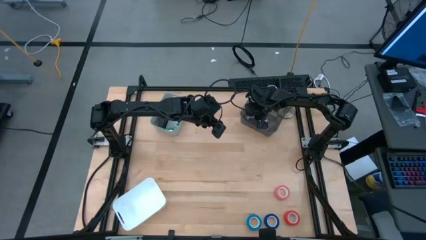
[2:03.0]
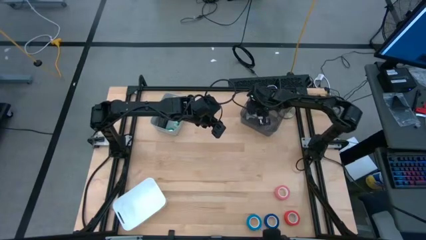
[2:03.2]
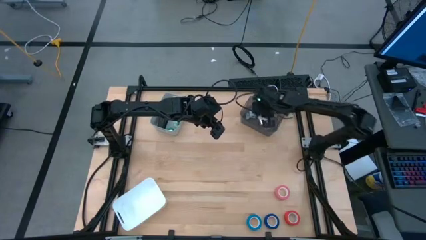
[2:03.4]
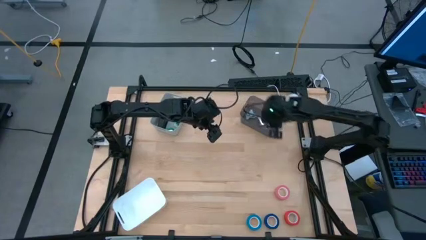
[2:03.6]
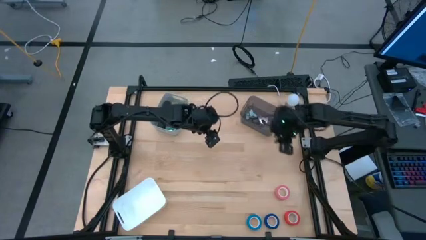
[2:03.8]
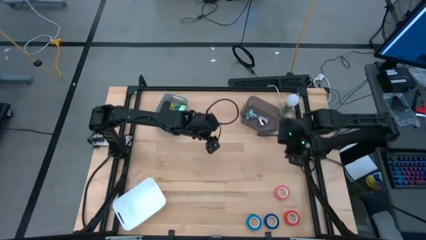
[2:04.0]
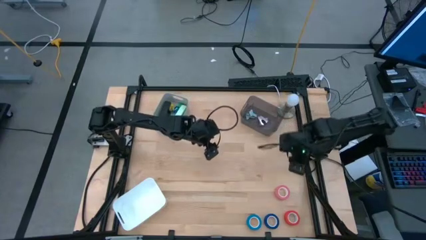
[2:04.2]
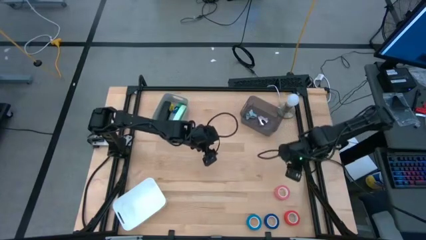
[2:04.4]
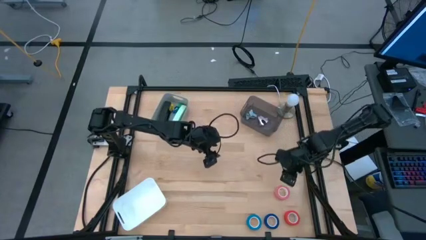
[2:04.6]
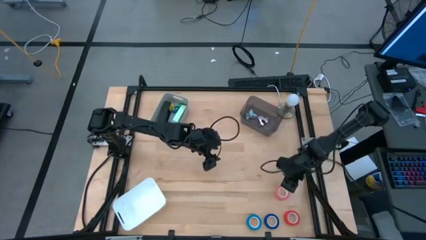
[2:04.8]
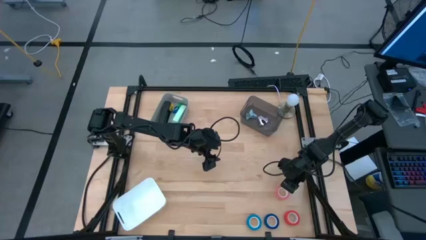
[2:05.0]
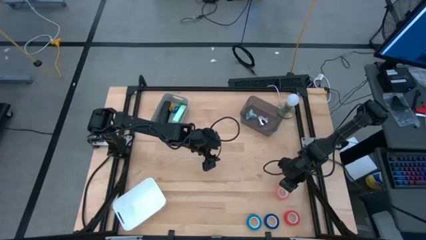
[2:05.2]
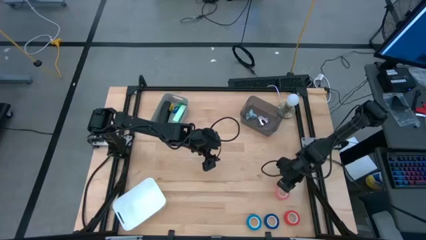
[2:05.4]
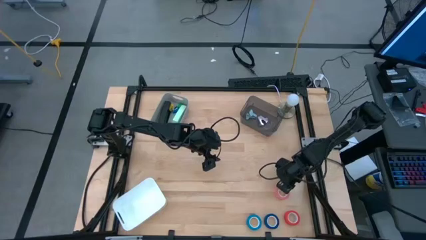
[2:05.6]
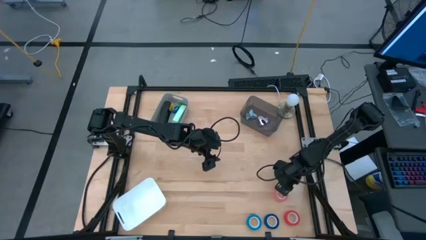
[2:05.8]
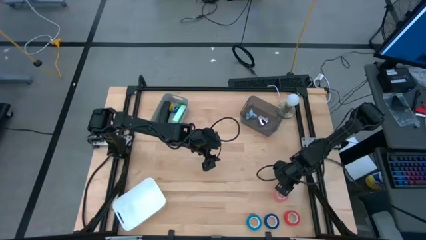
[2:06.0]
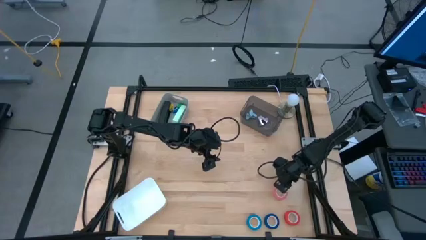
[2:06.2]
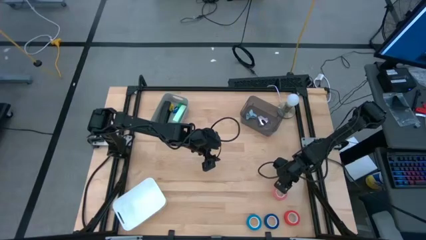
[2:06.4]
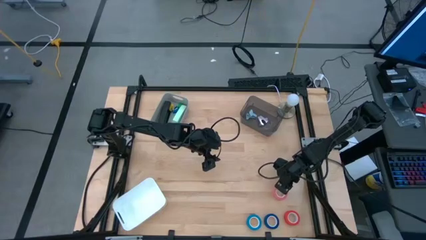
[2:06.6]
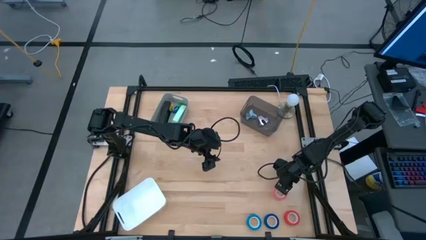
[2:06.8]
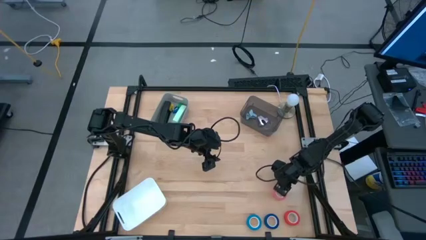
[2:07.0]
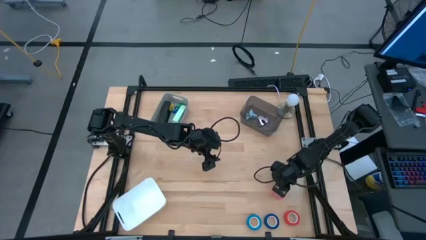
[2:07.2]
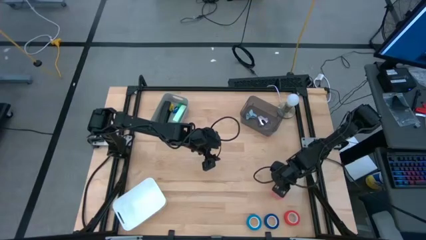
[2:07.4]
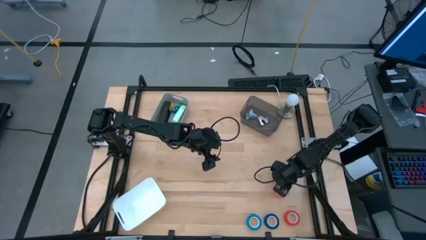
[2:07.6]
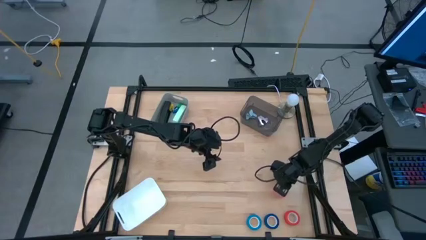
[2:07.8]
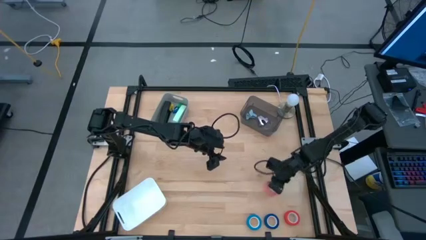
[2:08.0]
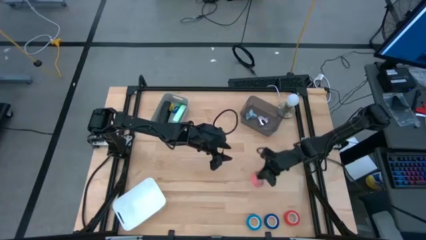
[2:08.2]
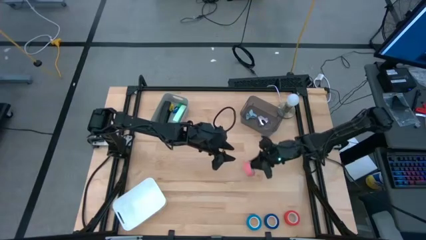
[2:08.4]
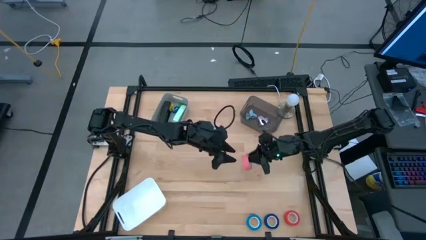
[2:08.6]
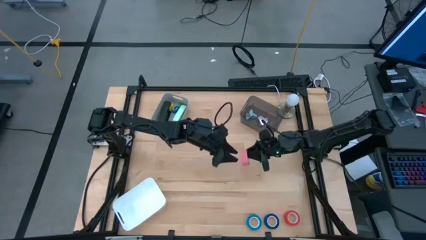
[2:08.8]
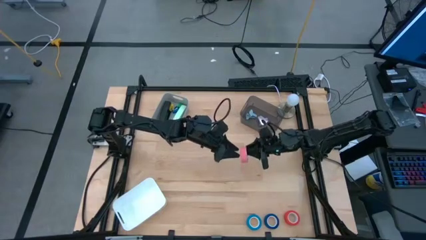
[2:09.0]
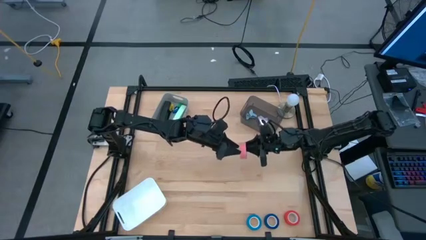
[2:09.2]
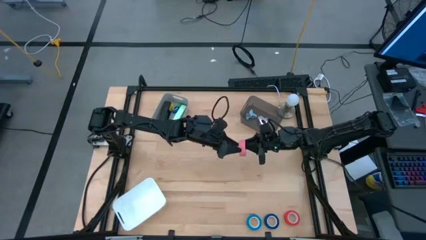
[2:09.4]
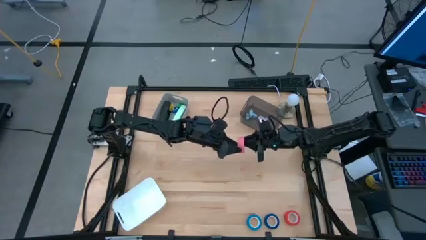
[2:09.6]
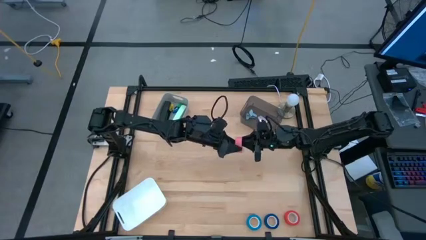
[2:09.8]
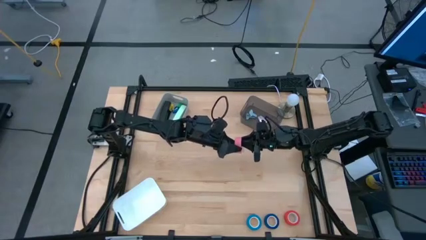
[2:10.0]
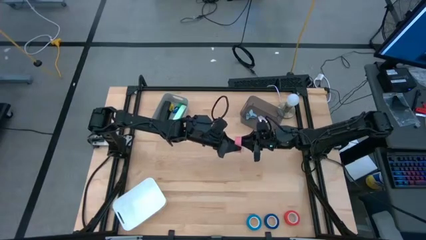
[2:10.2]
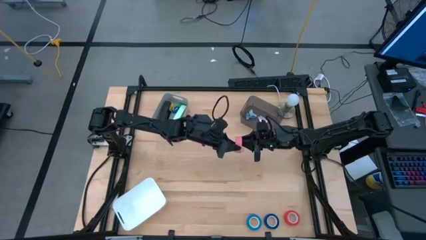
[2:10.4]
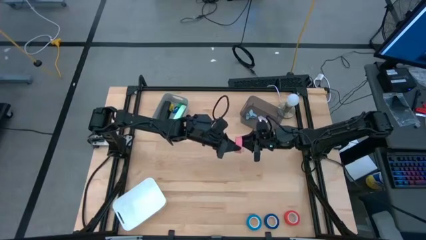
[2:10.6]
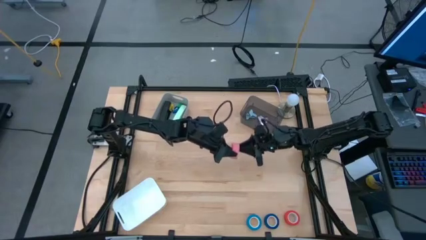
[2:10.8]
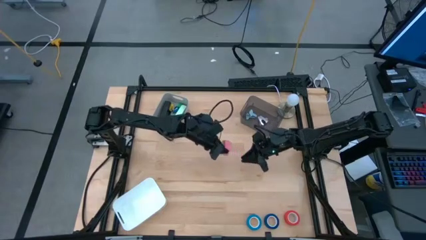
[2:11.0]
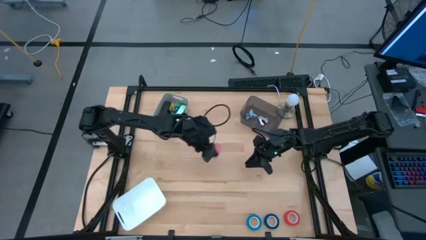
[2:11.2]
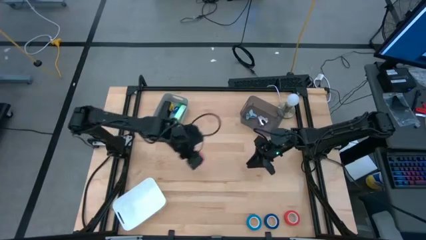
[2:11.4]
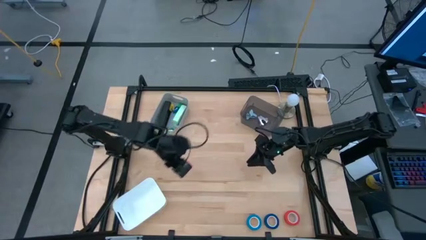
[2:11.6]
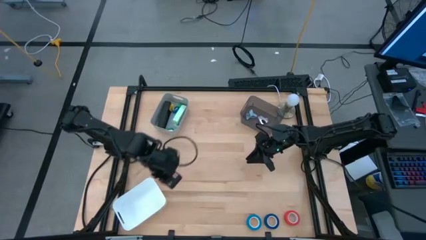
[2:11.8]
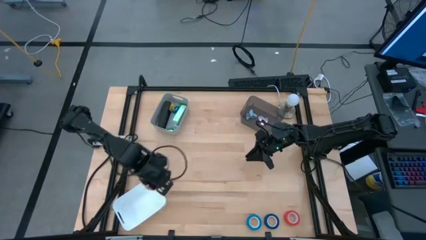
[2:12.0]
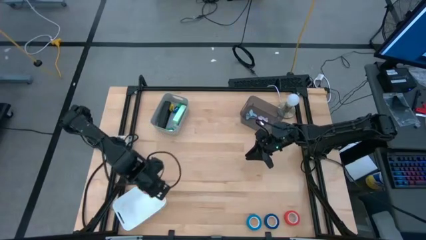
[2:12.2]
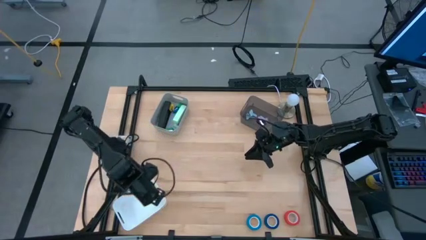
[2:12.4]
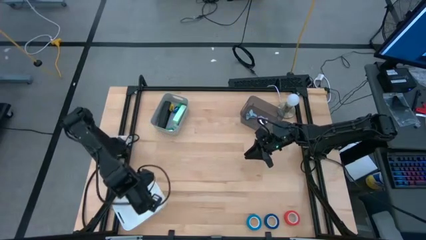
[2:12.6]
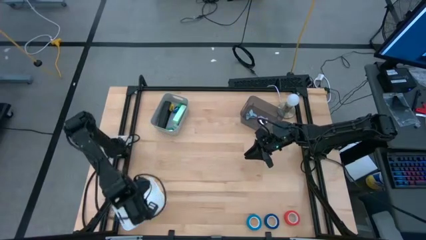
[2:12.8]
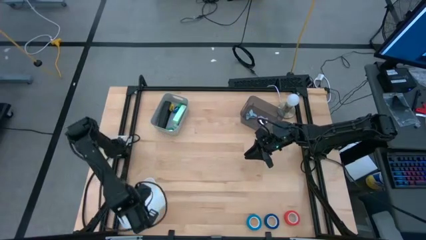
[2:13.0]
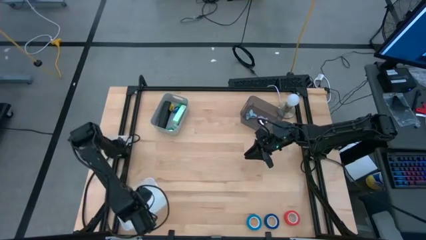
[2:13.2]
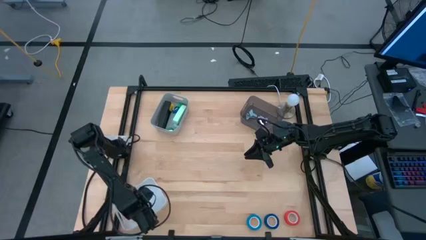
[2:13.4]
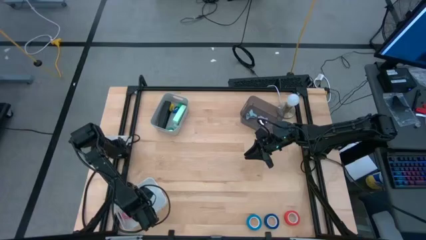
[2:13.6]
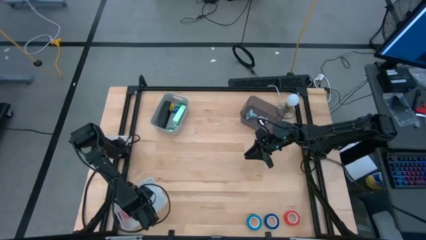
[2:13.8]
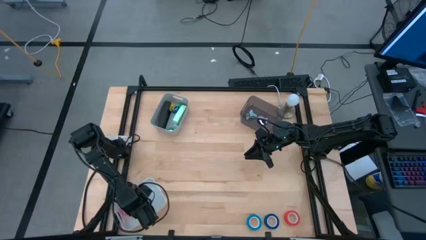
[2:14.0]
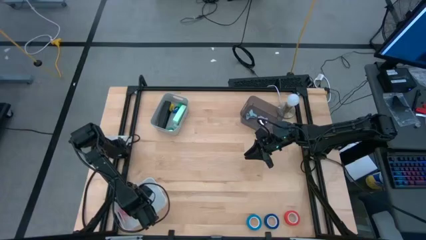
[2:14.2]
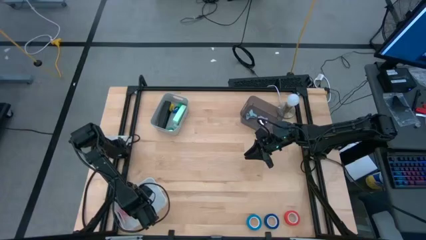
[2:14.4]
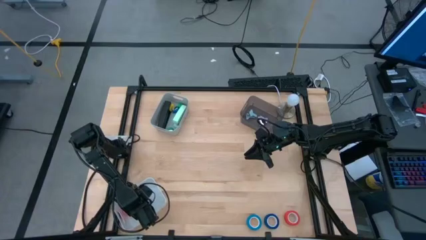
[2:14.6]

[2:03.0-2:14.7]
Task: Pick and place Stapler, Stapler remover, tape
Put the pink tape into the white bin

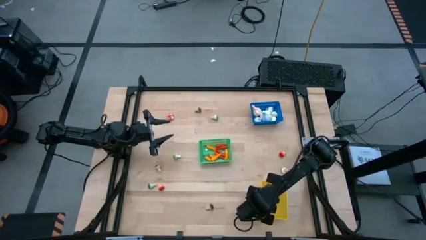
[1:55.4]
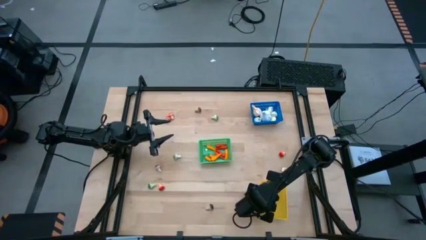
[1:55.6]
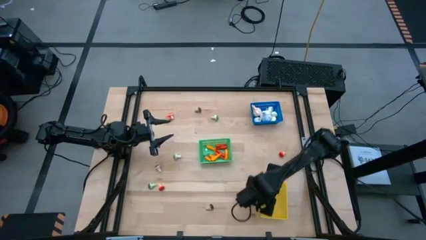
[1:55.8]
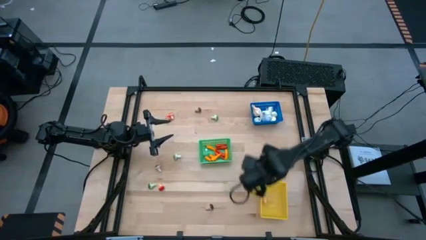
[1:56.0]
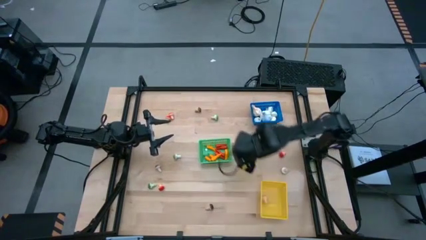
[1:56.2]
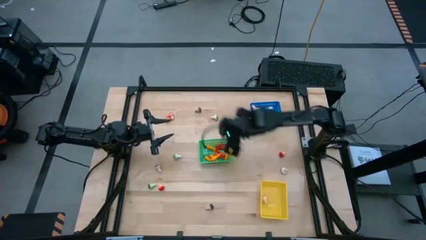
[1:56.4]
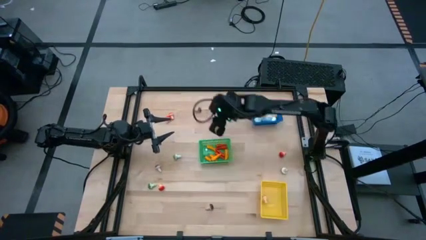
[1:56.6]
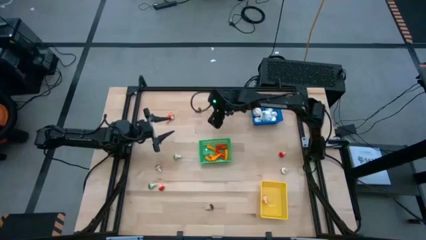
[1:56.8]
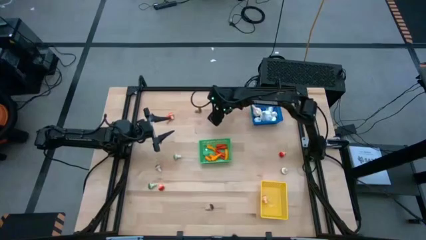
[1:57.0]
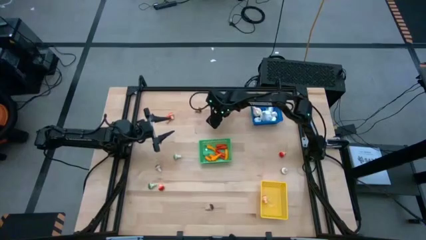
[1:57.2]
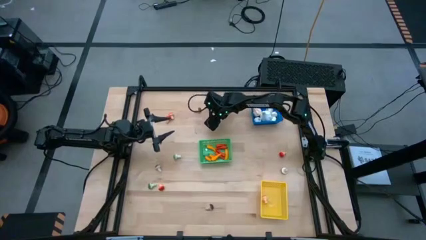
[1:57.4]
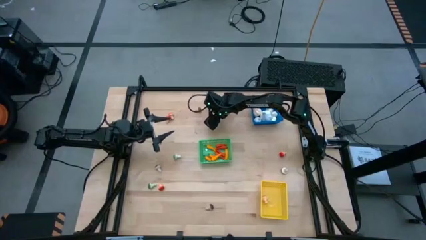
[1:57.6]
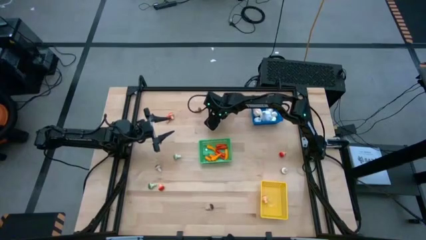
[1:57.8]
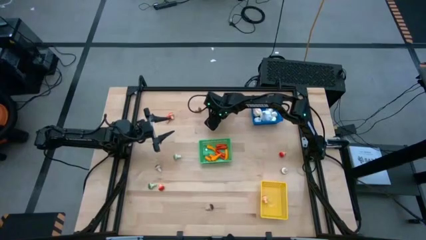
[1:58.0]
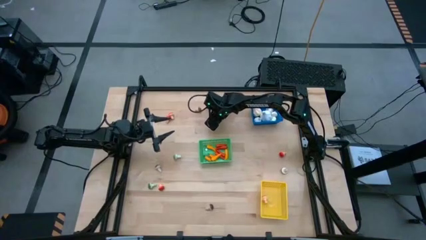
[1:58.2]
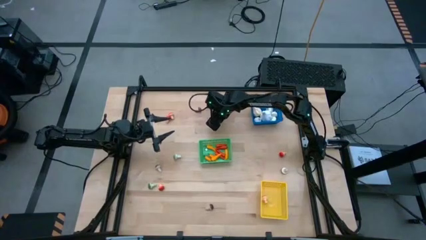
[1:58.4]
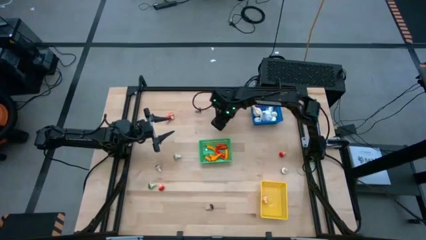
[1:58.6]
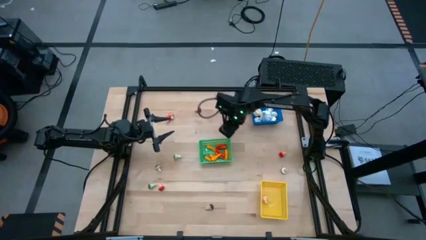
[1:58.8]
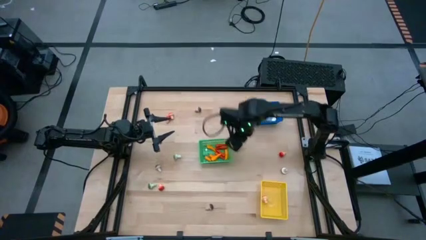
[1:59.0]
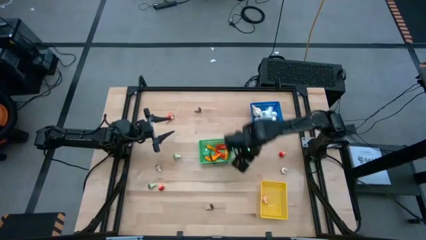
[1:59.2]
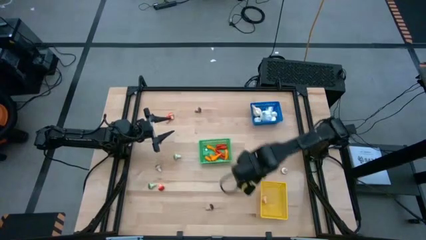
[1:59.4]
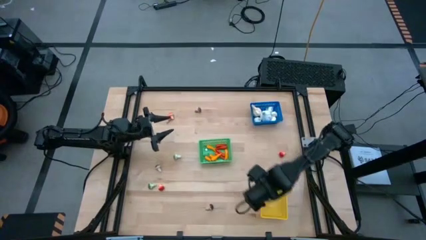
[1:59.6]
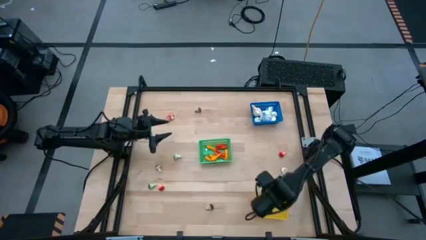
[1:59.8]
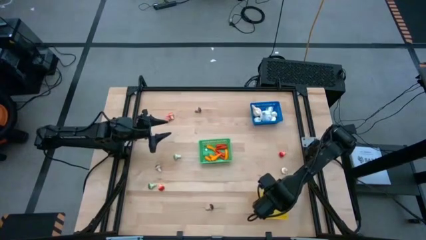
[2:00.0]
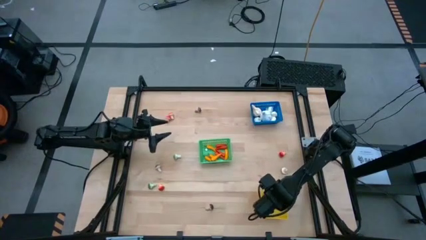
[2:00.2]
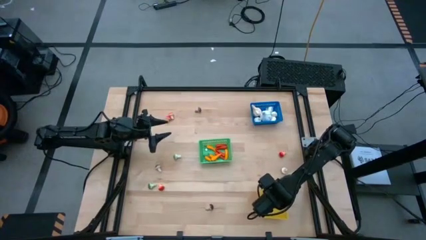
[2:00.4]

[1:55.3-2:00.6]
Task: Sort produce into baskets
Put the green mushroom into the yellow bin
